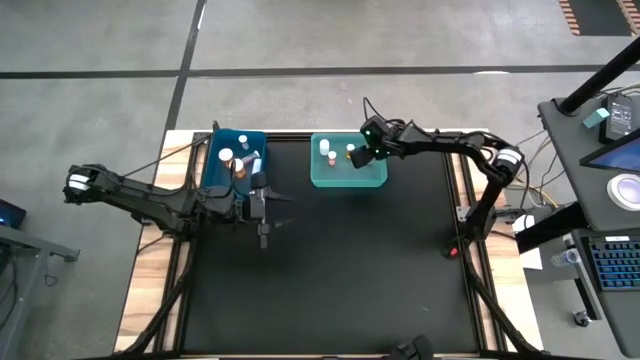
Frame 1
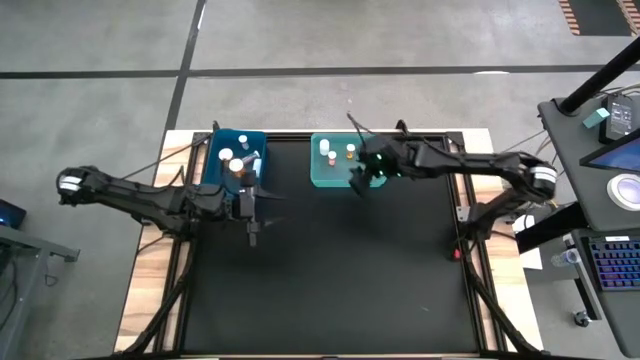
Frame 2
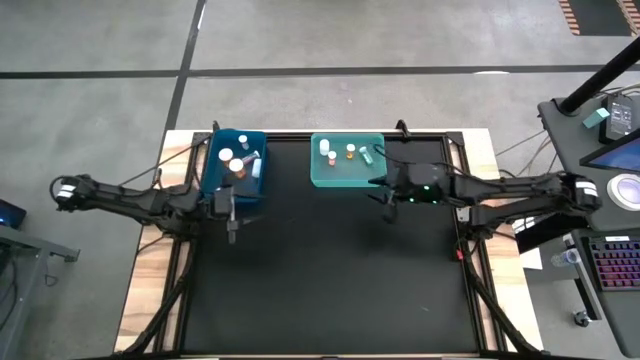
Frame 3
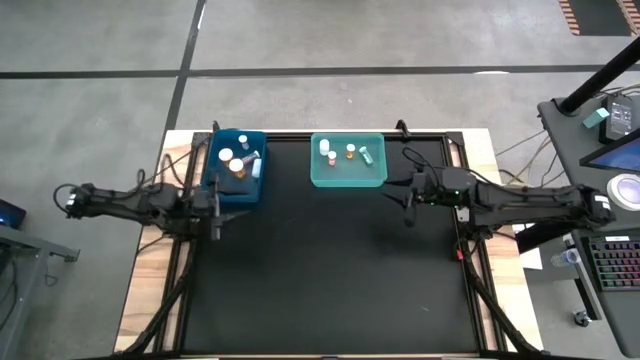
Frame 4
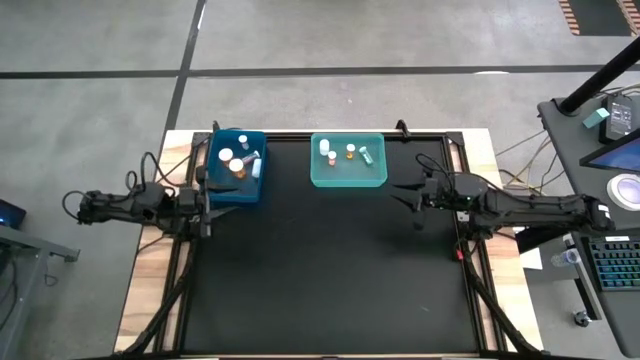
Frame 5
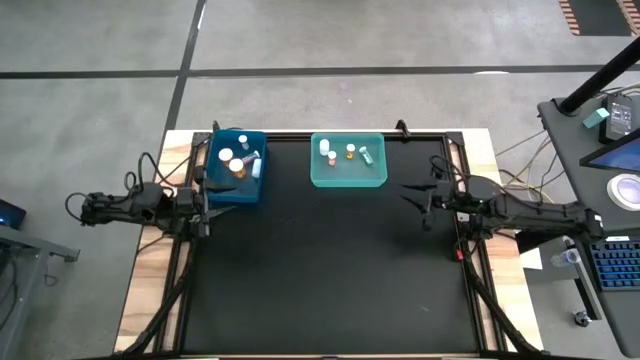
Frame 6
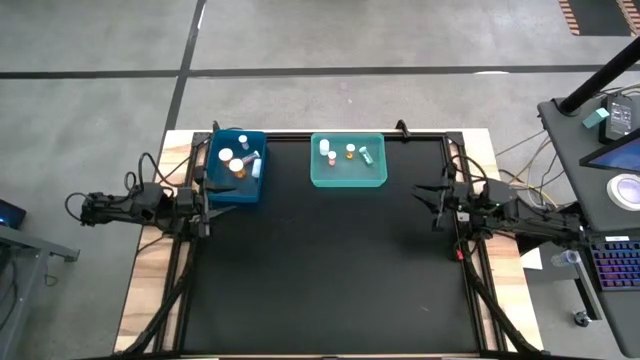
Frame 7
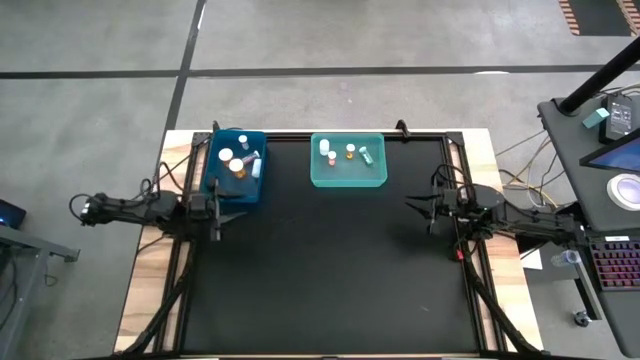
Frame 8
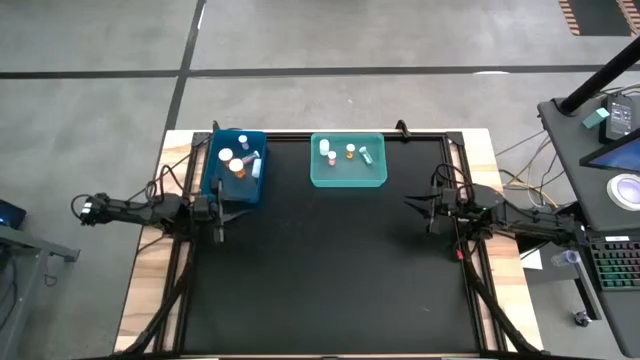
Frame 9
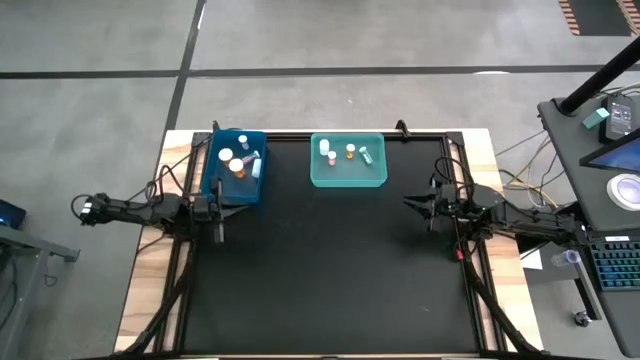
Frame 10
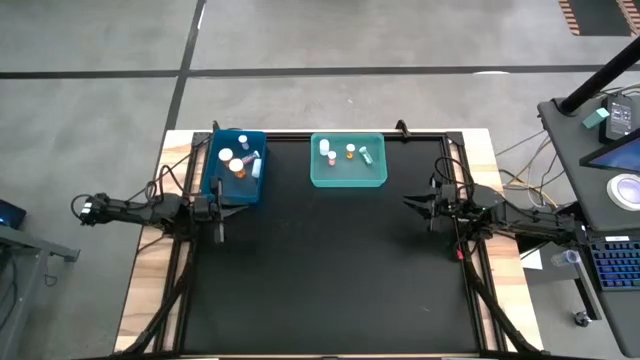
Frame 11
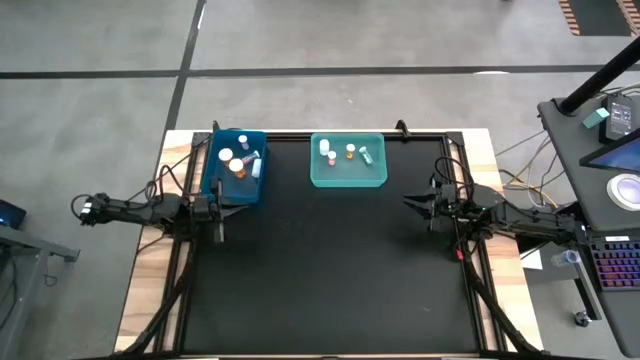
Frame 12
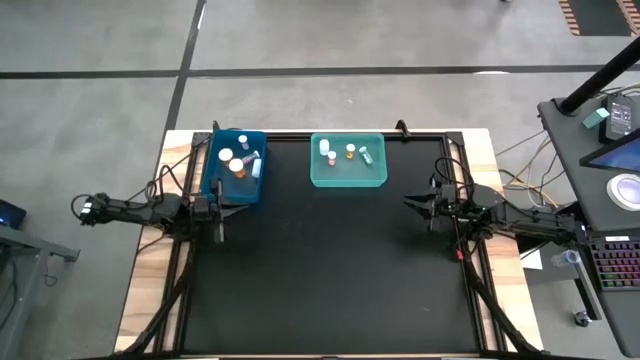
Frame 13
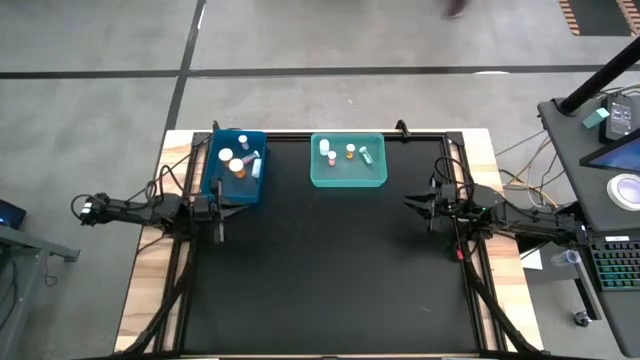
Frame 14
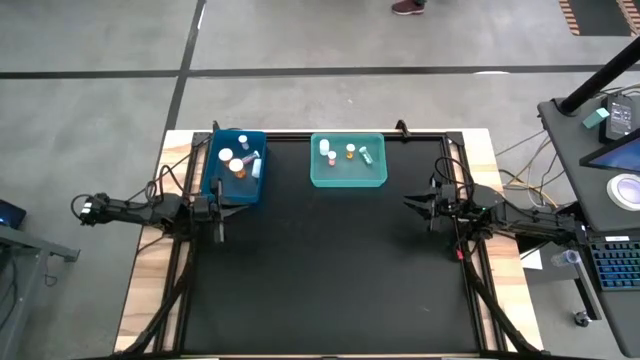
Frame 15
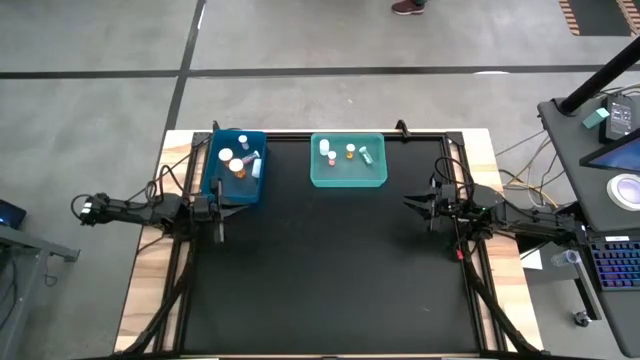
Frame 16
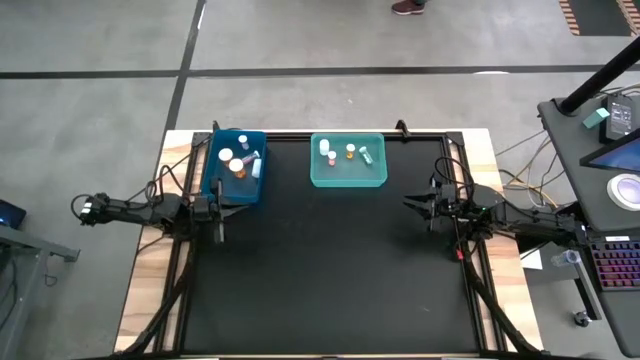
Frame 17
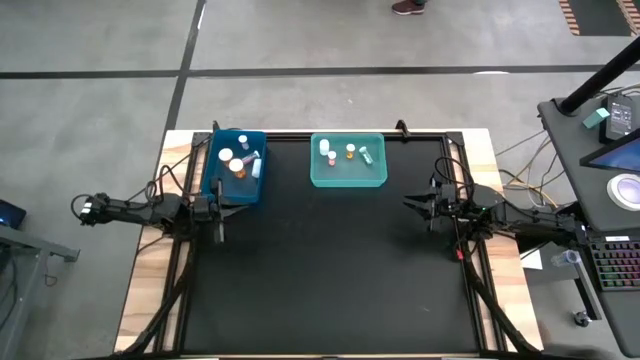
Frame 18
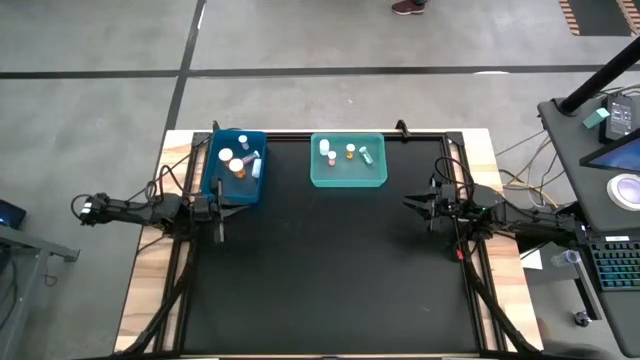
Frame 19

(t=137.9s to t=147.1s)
Task: Pick and place medicine bottles into bin by pill shape (circle, oval)
Return to Home Position

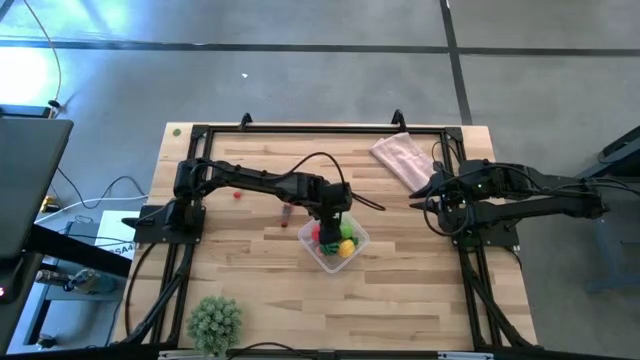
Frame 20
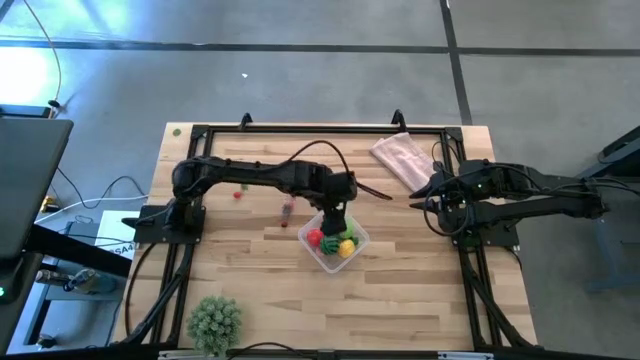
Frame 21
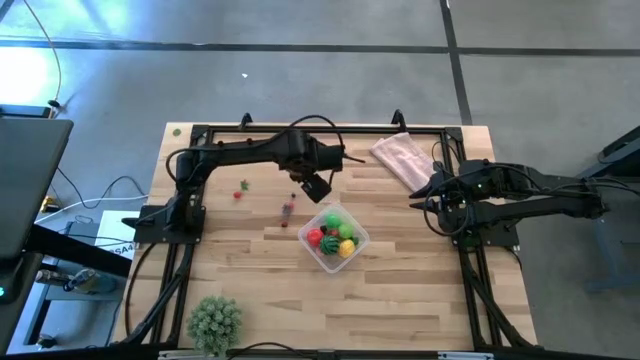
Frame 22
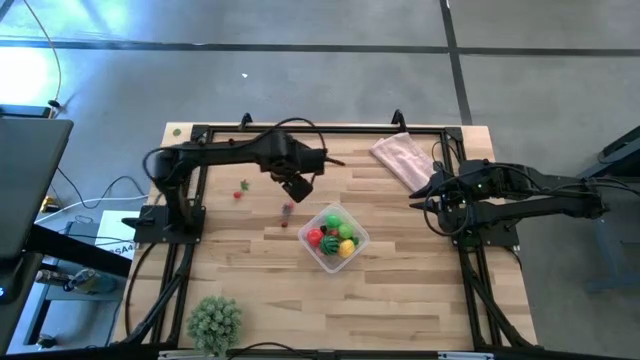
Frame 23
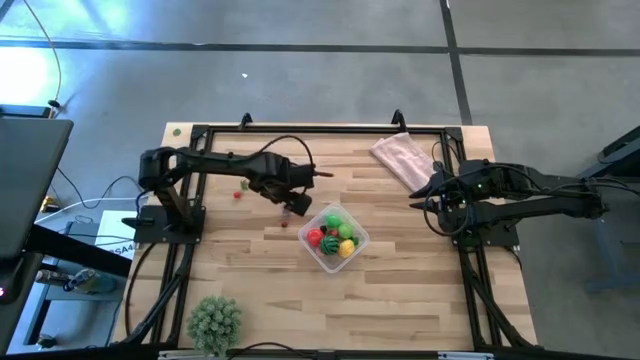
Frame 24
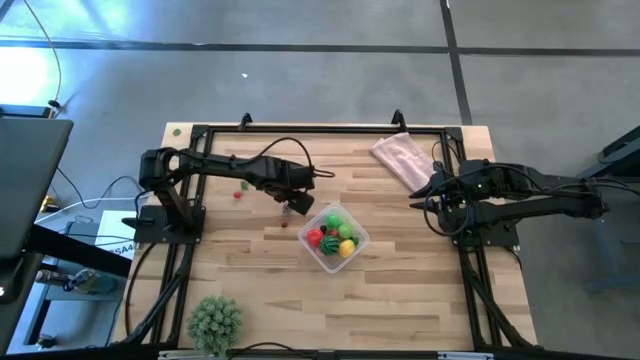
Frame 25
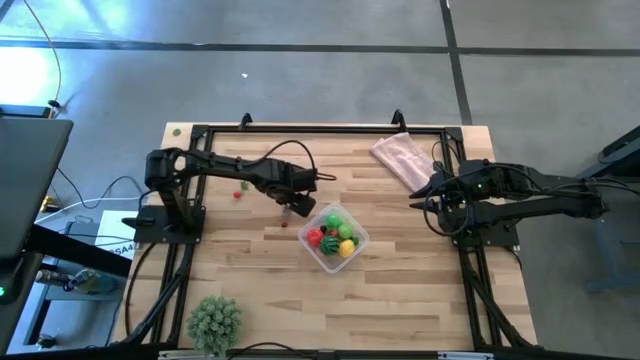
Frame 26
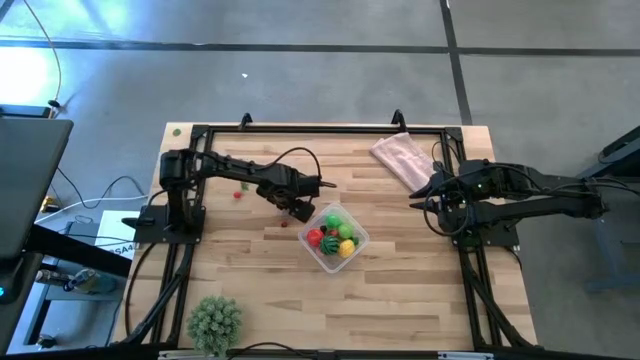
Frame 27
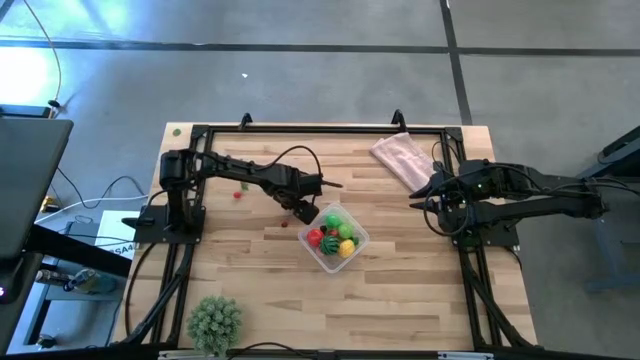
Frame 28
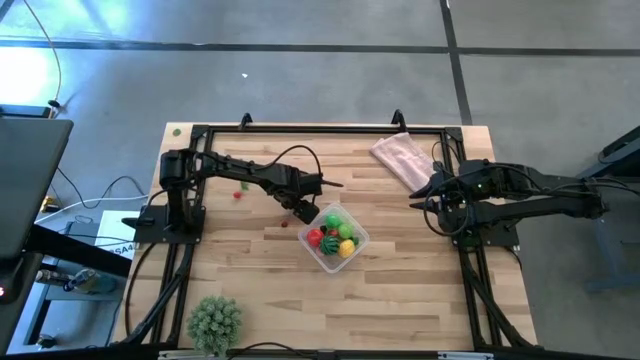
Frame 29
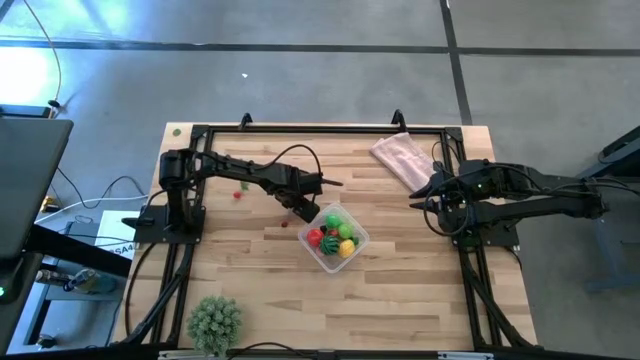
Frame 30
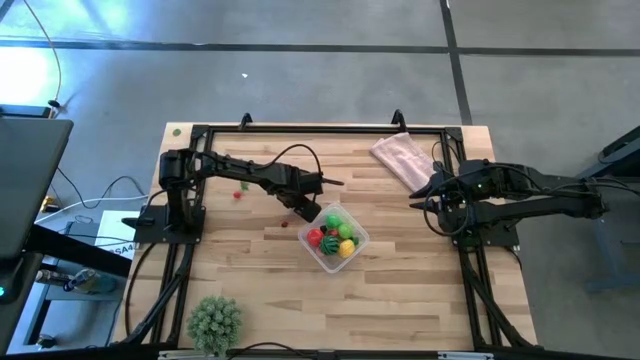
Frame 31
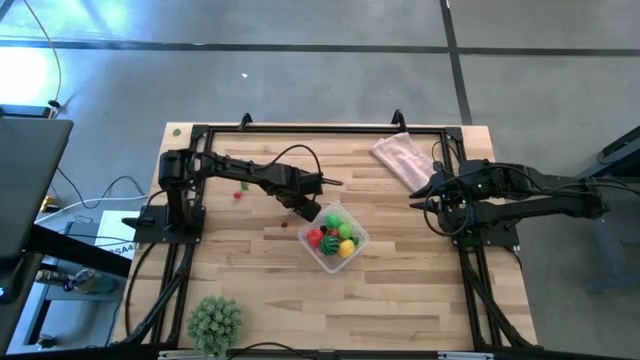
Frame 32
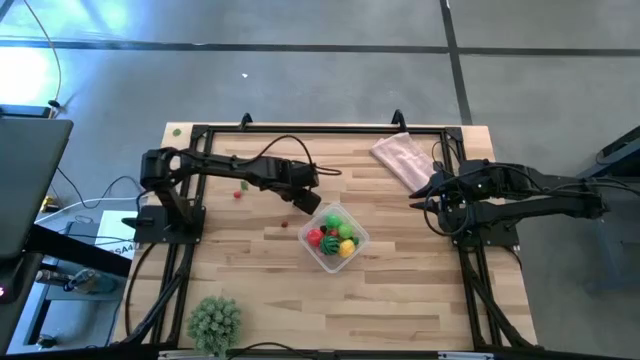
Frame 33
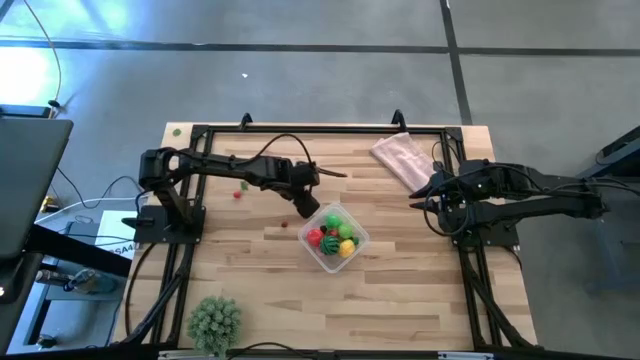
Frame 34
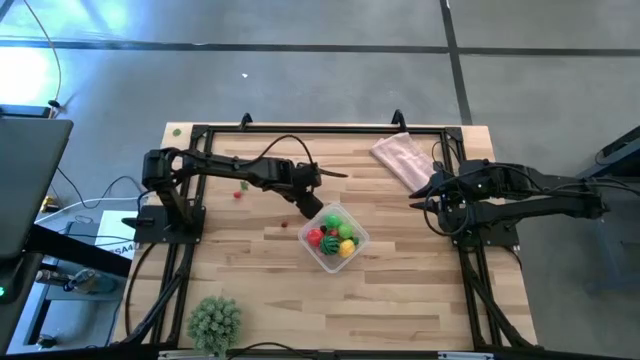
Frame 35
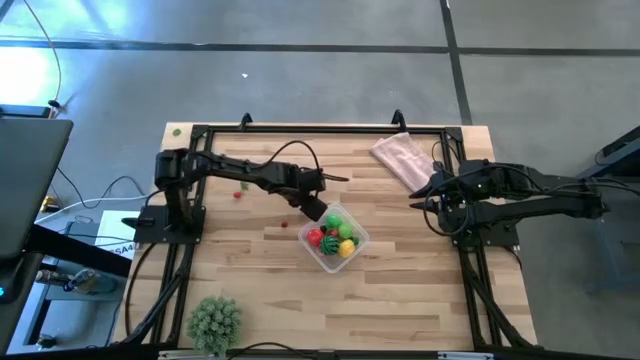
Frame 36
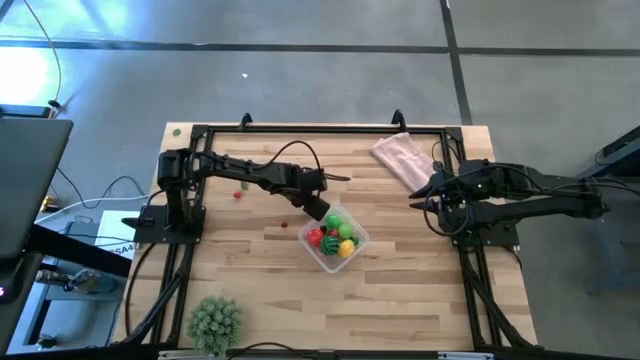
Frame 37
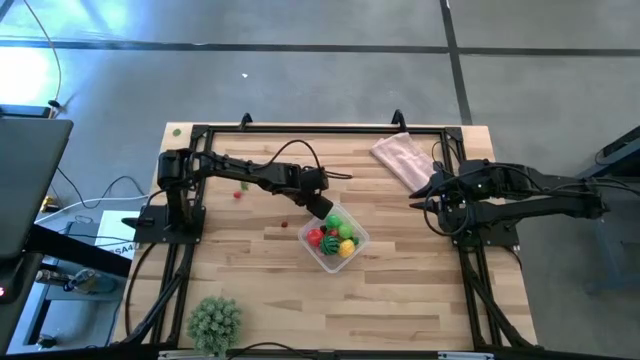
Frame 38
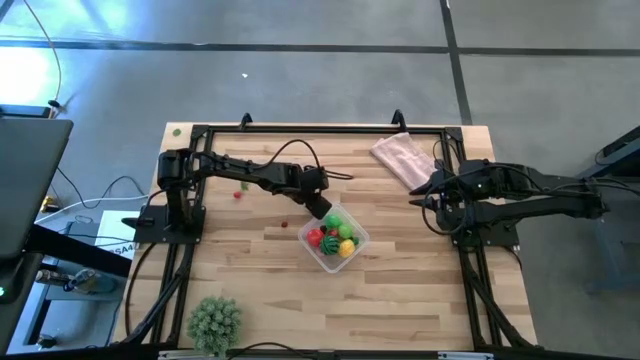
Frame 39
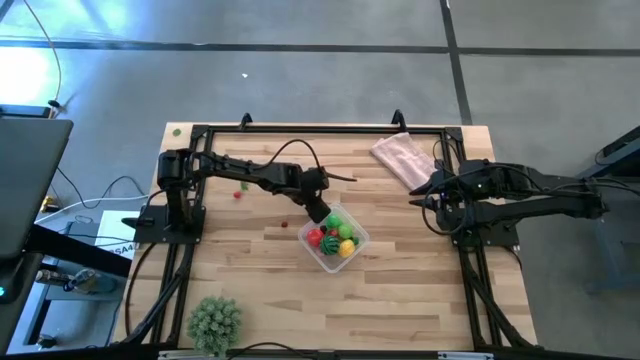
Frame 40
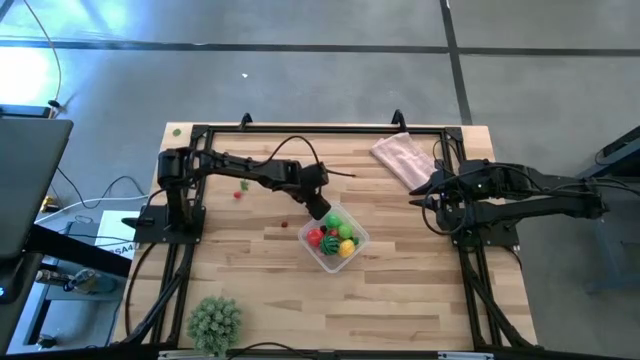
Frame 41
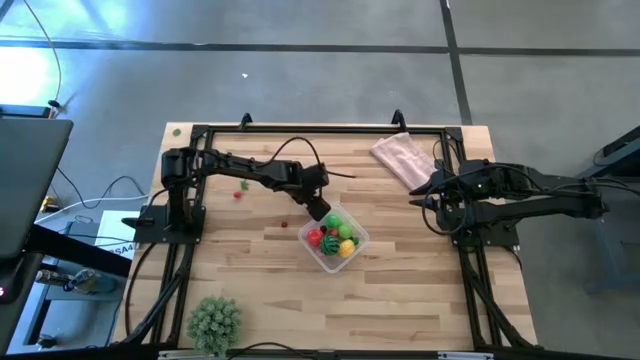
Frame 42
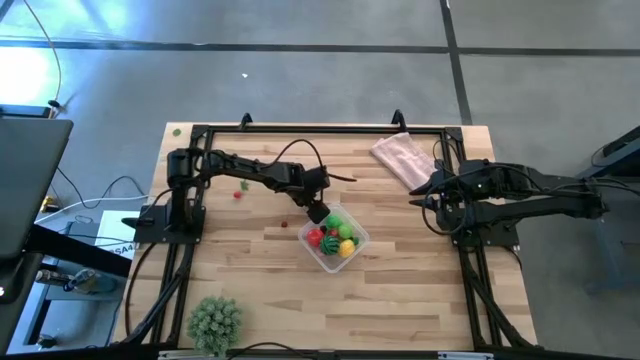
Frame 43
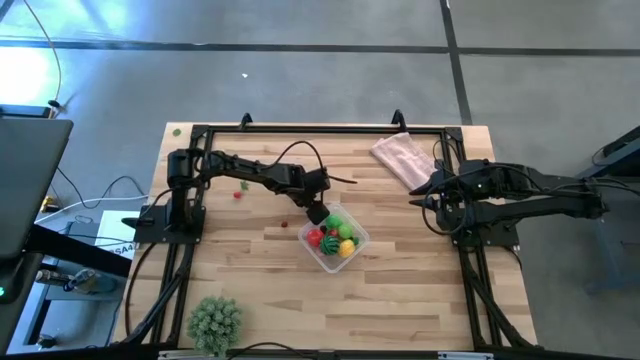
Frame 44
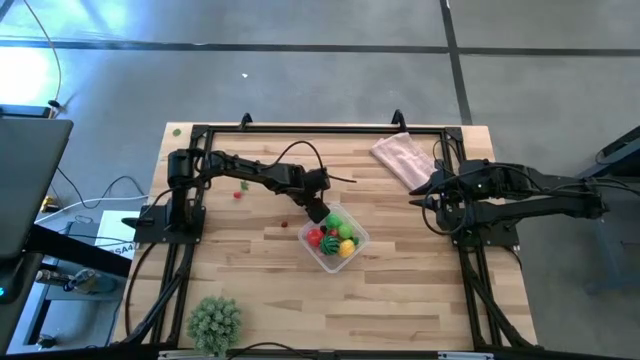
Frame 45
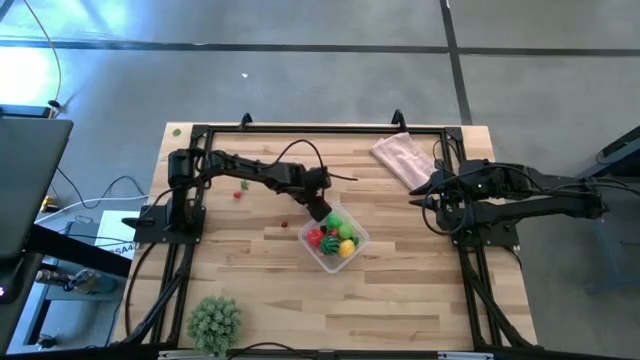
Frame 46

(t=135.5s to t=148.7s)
Task: Pick and placing Produce into tupperware
Put the red strawberry into the transparent container
